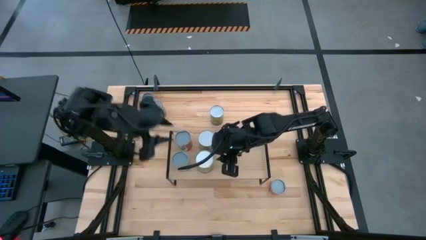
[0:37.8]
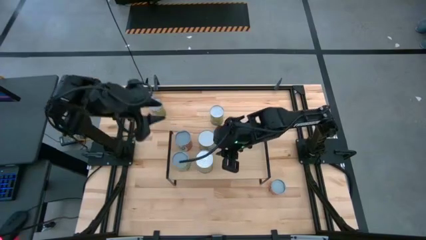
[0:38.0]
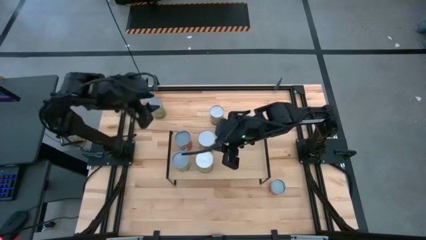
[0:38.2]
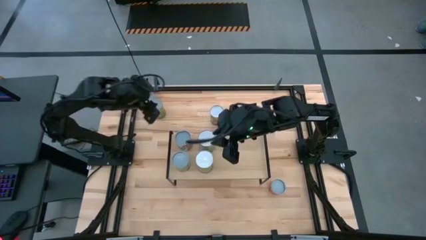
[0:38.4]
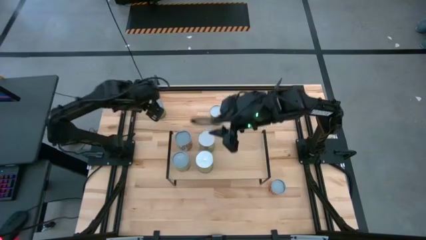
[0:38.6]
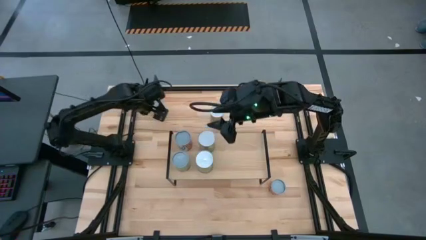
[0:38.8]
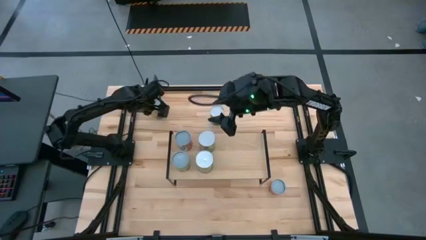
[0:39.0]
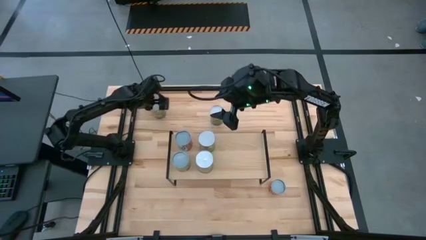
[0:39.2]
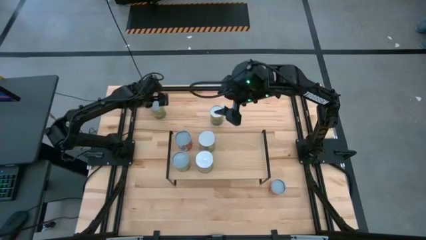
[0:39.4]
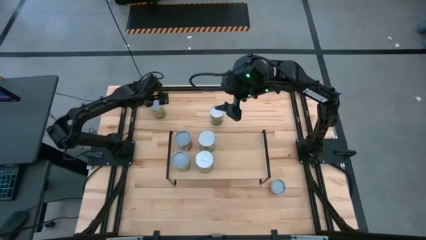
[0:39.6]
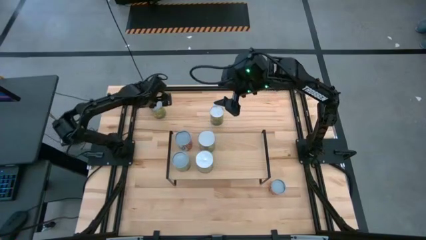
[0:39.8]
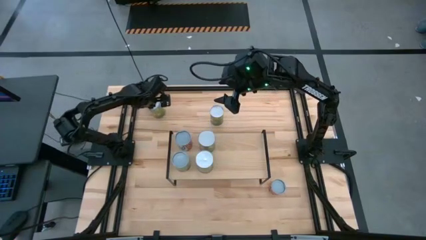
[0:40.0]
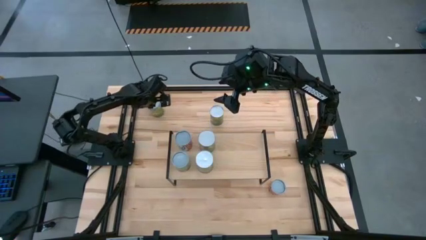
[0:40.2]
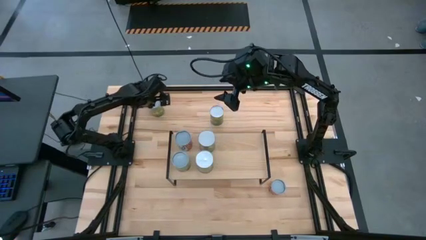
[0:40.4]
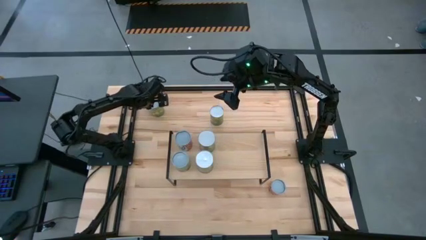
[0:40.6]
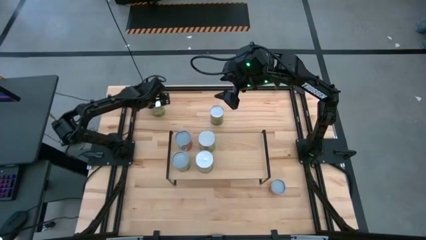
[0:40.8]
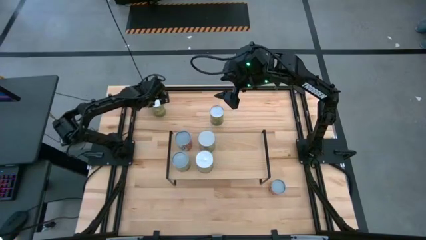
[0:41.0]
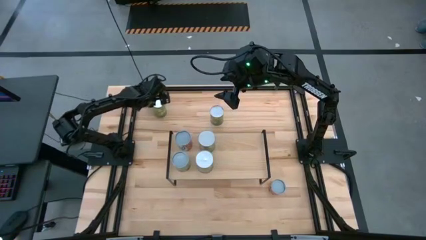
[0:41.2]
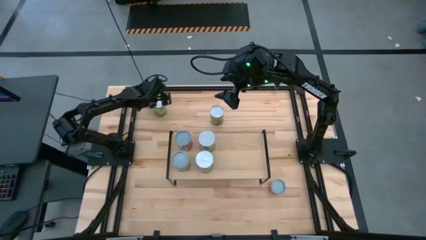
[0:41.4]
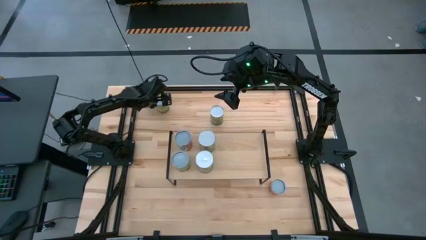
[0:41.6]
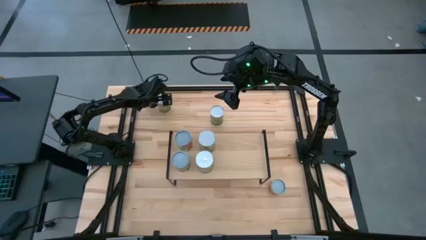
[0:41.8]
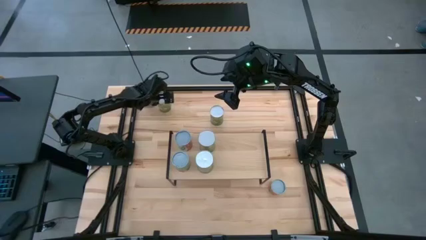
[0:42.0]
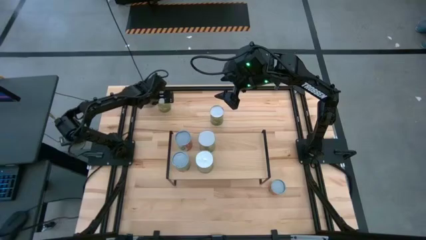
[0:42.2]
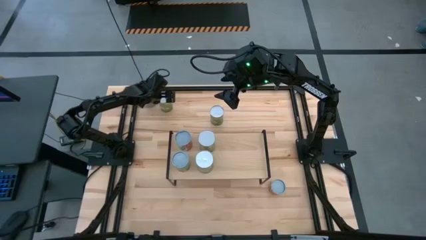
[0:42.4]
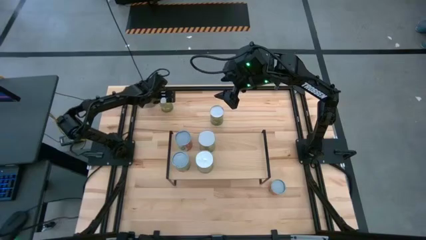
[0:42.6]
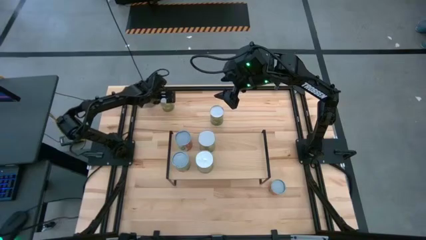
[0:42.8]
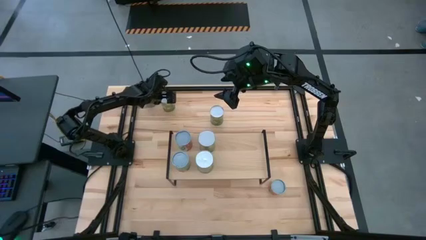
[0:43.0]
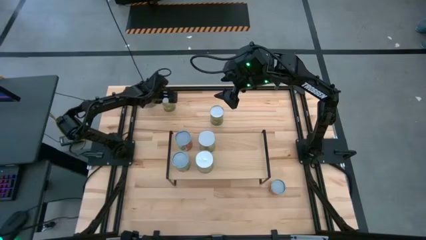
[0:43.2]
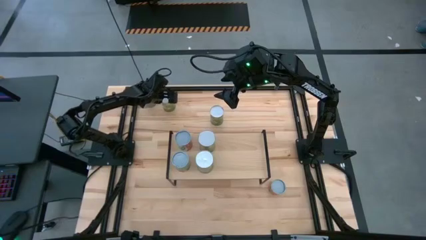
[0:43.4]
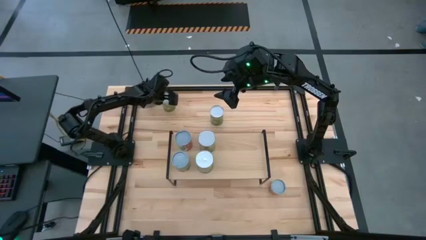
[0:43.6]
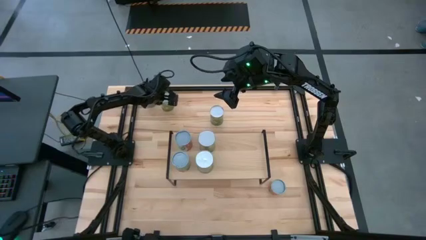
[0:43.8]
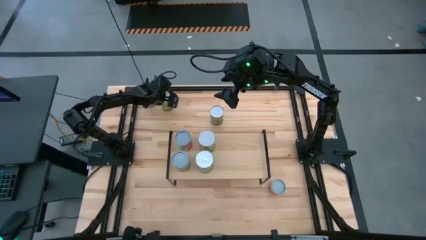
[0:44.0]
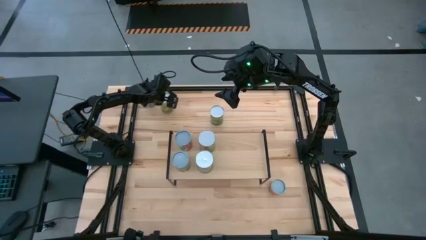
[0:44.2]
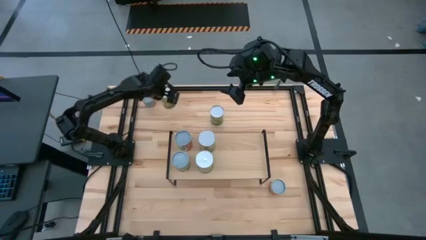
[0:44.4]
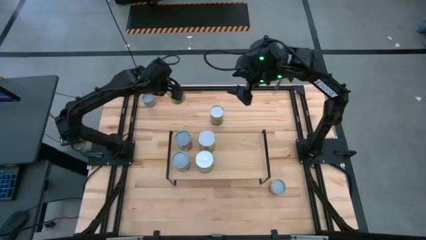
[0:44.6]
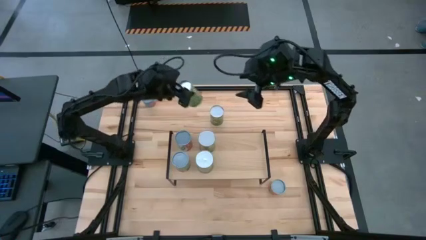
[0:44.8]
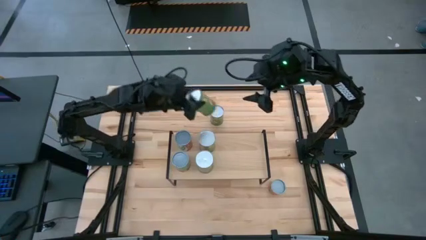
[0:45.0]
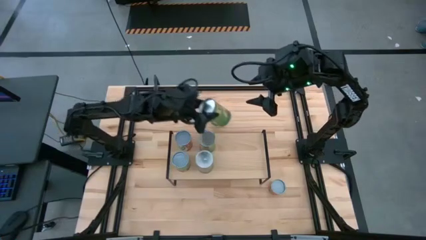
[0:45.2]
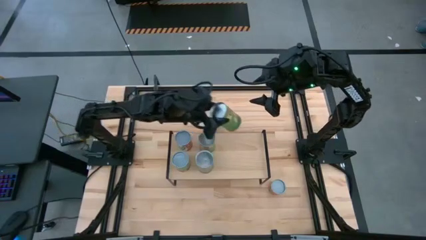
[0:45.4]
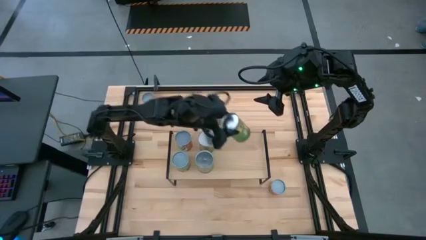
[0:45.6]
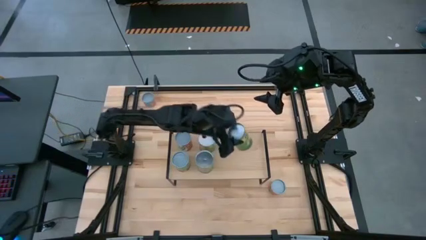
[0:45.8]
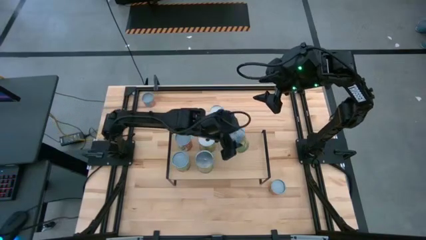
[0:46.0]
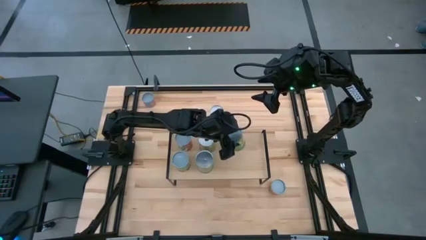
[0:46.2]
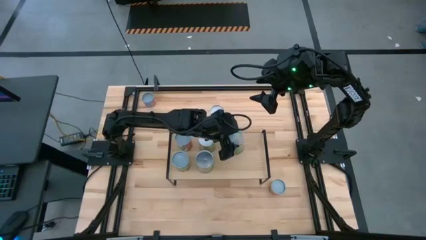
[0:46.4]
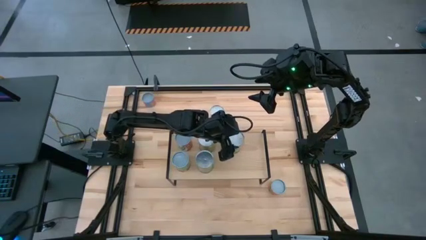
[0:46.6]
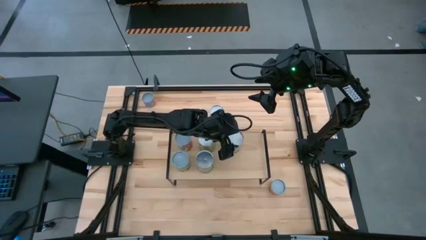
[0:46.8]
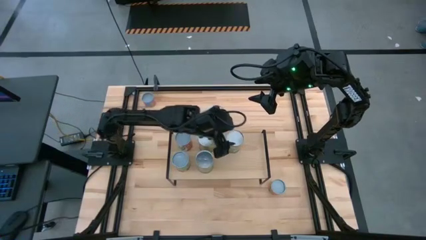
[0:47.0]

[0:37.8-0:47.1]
Task: Pick and place cans onto a shelf
Put the left canned pears on the shelf

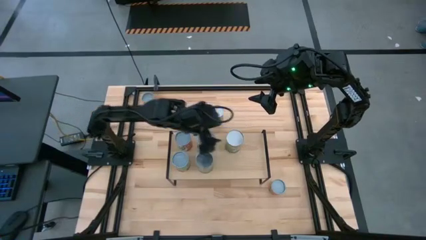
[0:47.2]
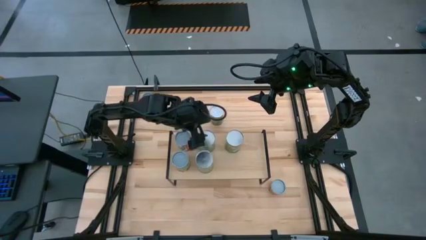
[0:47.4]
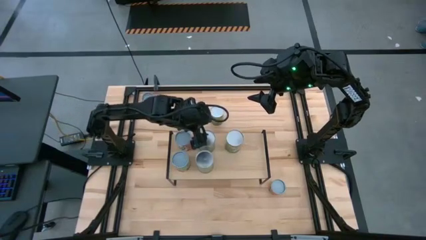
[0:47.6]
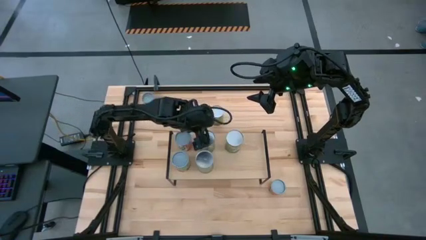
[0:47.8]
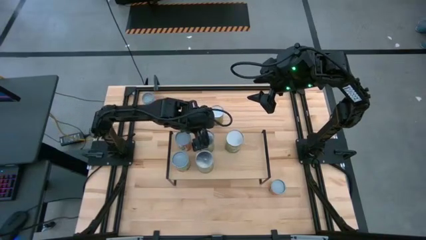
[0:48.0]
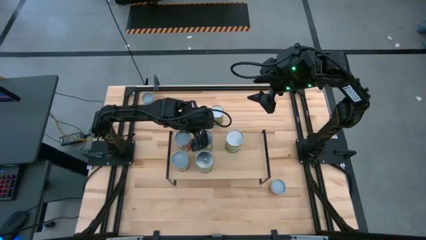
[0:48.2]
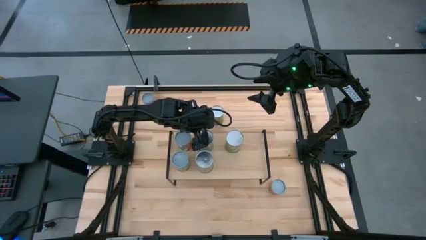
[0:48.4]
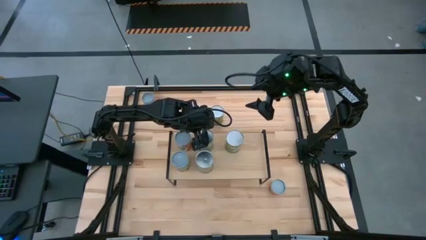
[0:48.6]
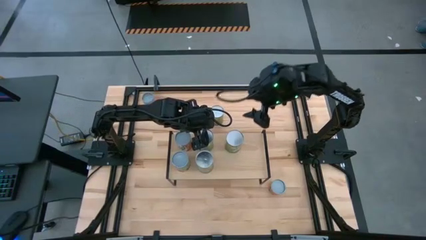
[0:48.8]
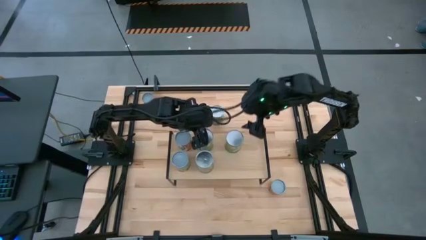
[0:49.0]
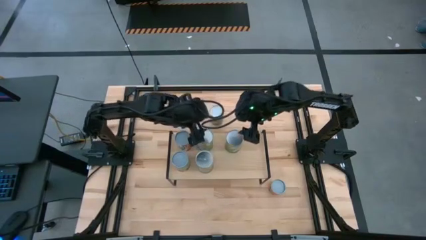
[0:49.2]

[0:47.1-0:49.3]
Adjust the canned oranges

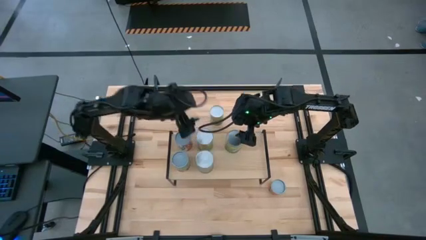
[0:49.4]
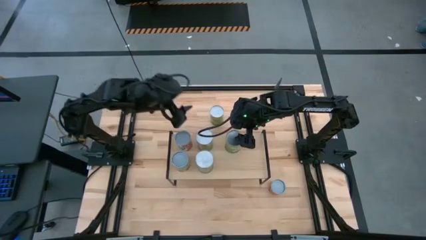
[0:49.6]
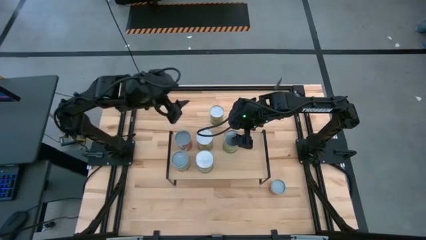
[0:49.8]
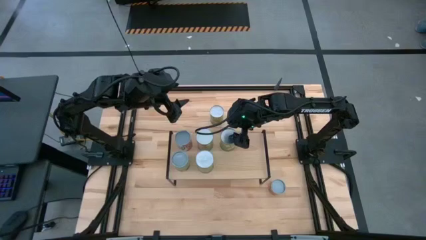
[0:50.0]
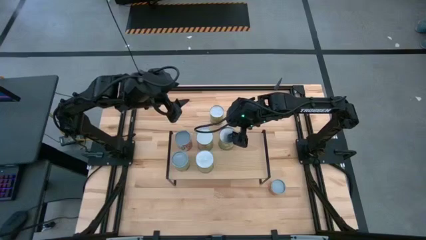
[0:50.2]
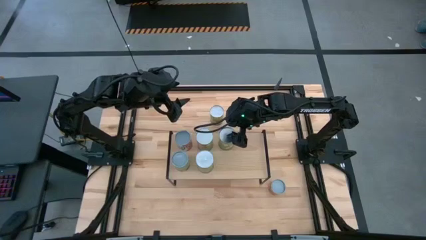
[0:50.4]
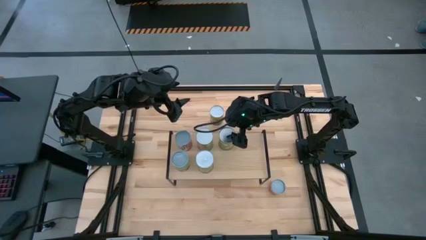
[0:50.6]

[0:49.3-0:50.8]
Adjust the canned pears

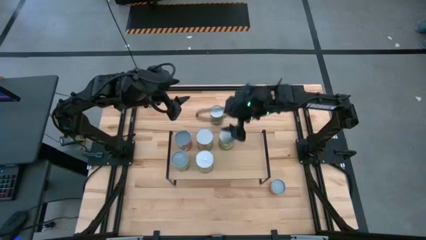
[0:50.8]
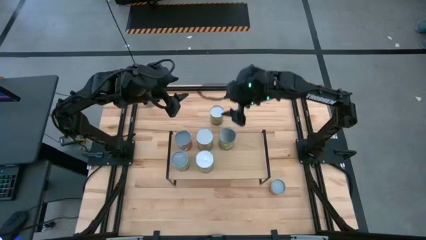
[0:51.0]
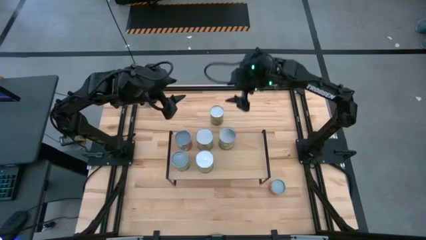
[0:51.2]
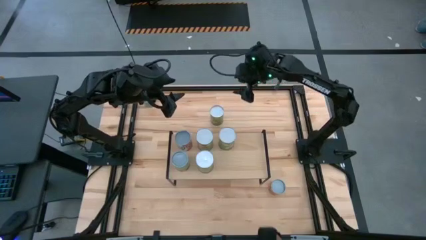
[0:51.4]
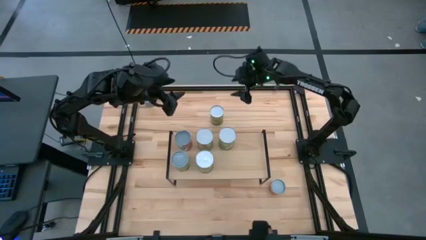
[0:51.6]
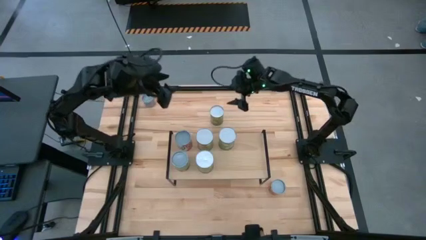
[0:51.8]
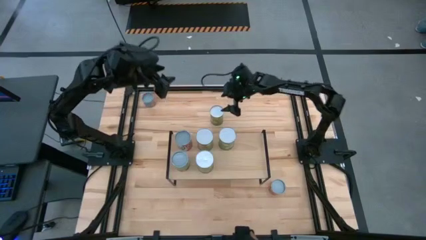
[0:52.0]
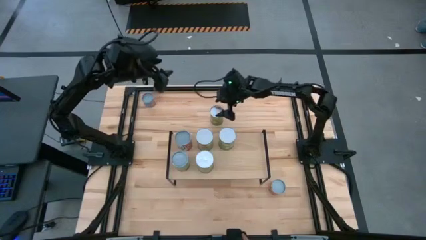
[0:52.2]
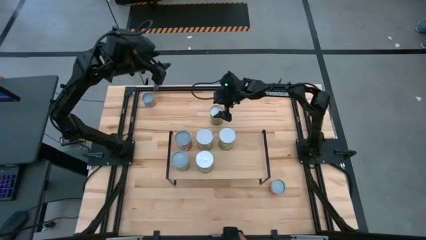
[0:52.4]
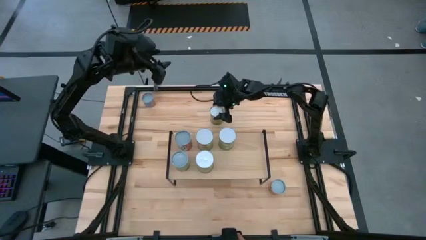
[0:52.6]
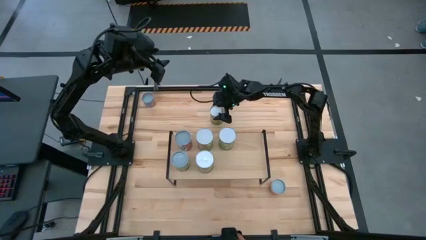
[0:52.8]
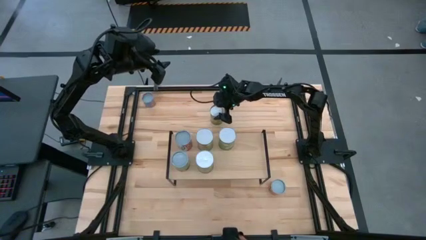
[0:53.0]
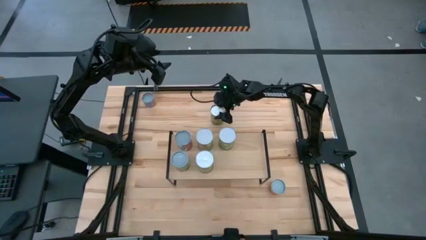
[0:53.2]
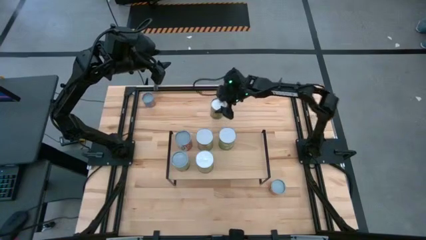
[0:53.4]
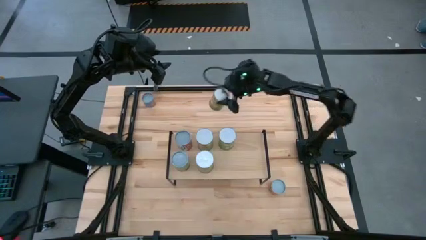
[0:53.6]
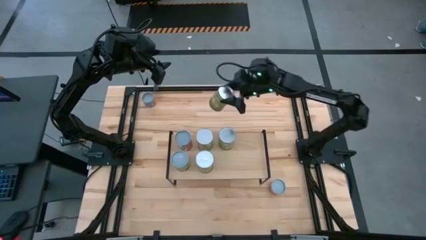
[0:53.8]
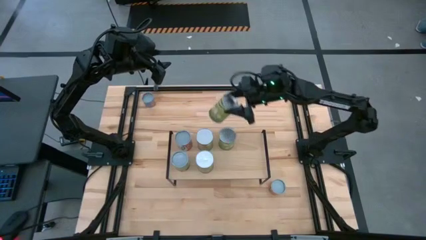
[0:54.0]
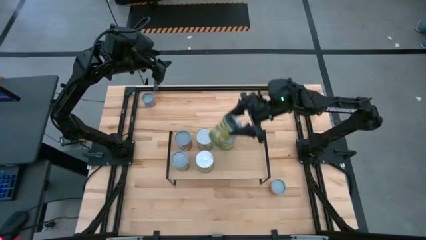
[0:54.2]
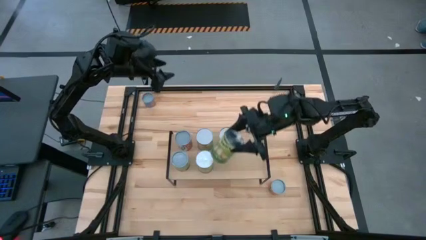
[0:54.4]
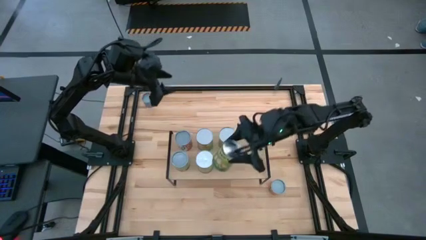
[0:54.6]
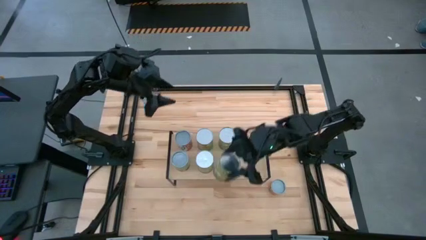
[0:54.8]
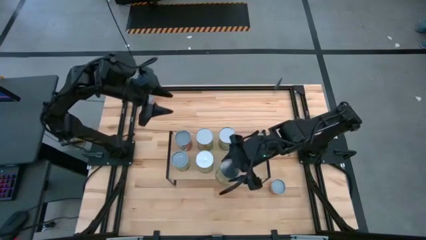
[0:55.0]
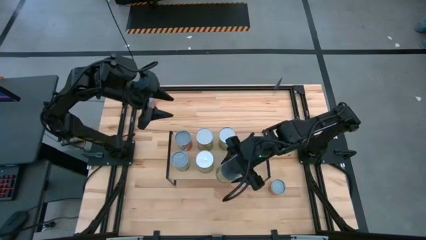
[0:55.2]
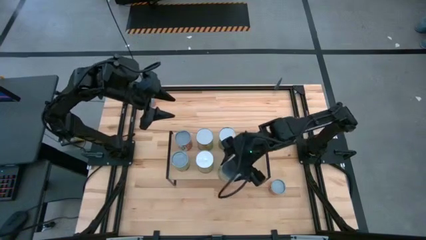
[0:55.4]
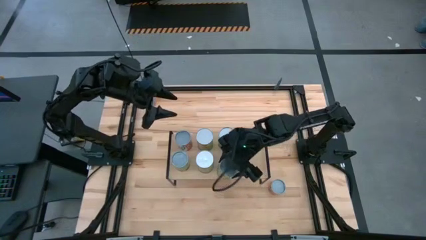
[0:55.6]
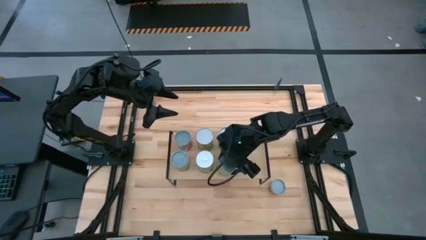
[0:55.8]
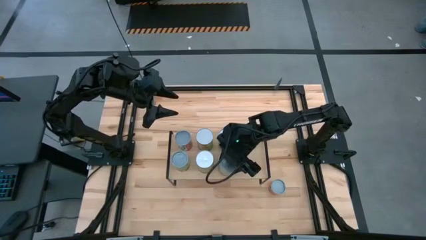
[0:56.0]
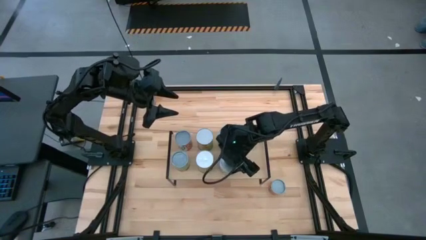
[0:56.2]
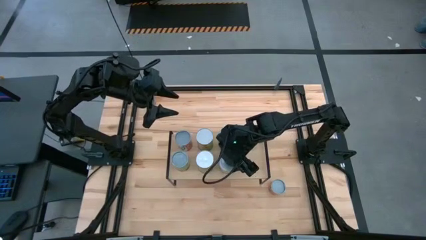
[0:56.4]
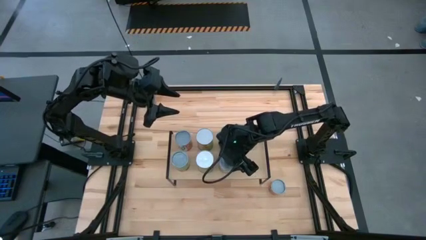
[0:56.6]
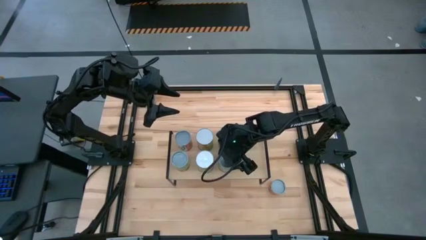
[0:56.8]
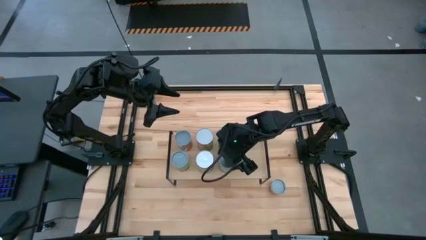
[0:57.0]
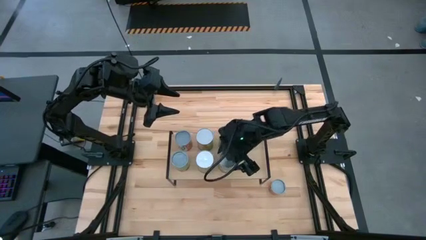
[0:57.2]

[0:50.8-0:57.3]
Put the canned pears on the shelf aligned with the other canned pears
